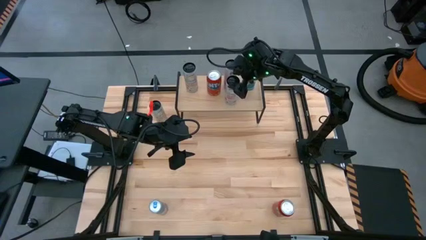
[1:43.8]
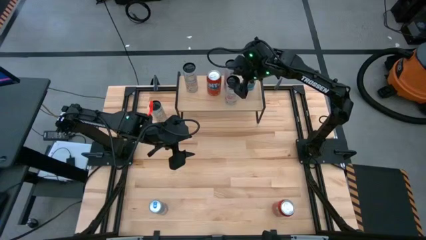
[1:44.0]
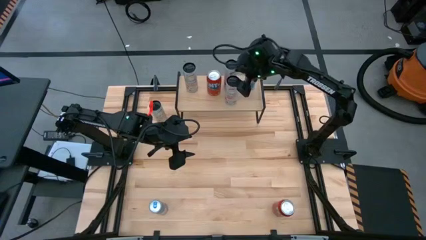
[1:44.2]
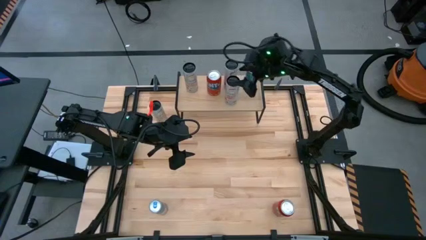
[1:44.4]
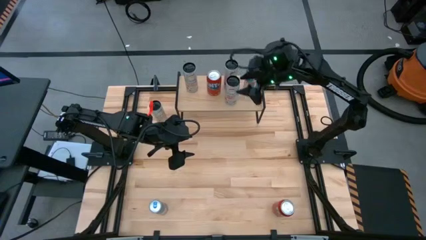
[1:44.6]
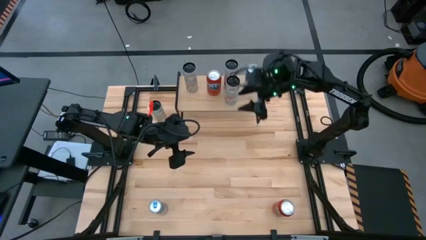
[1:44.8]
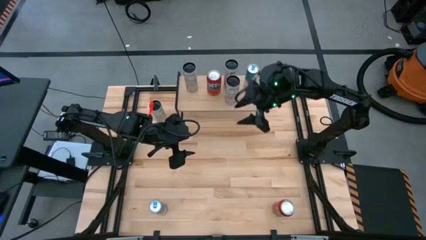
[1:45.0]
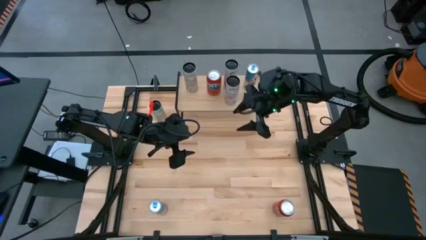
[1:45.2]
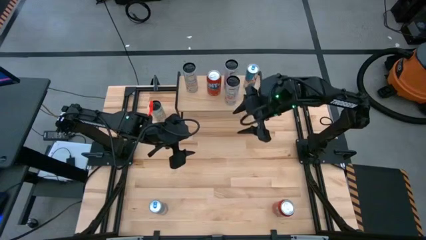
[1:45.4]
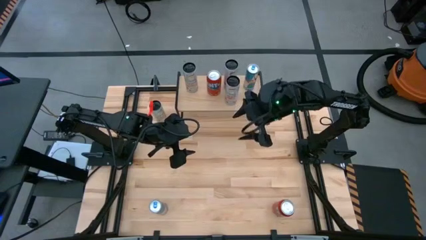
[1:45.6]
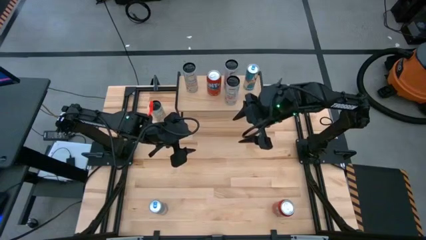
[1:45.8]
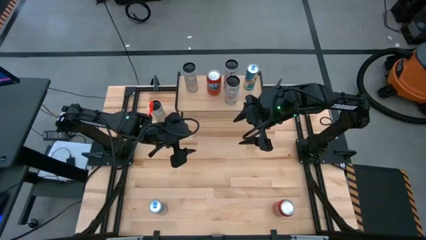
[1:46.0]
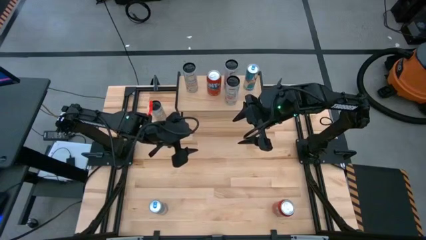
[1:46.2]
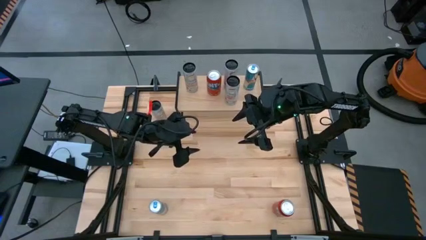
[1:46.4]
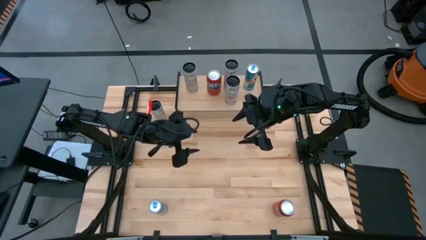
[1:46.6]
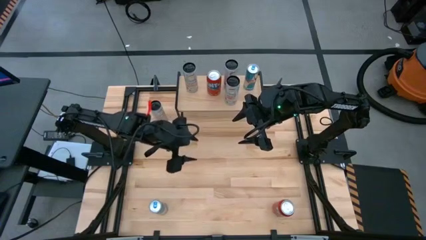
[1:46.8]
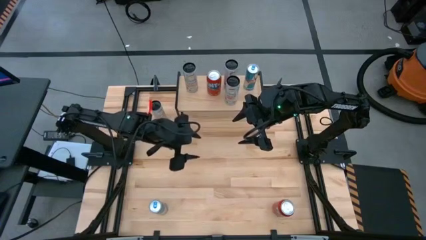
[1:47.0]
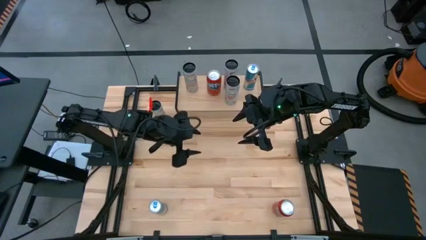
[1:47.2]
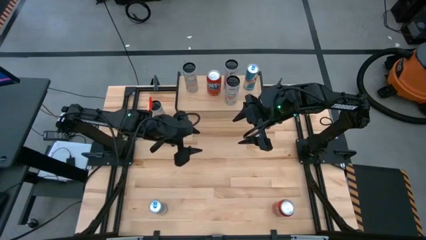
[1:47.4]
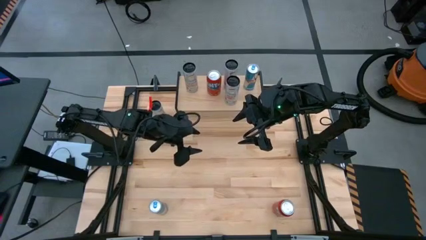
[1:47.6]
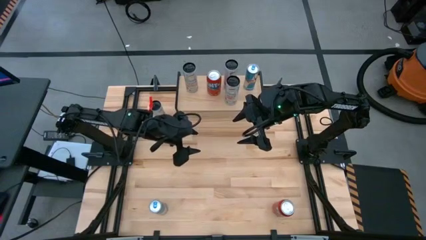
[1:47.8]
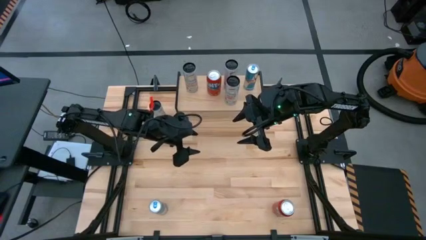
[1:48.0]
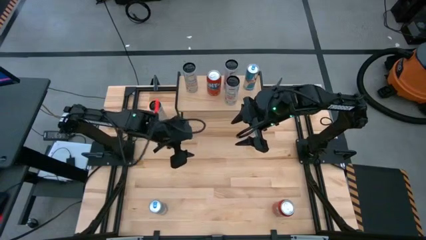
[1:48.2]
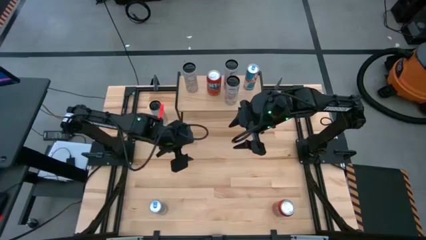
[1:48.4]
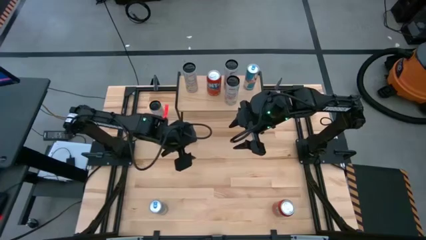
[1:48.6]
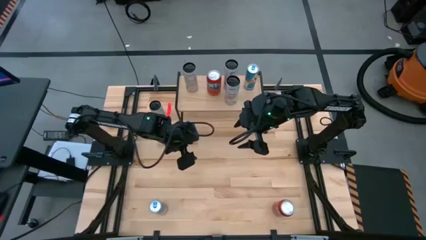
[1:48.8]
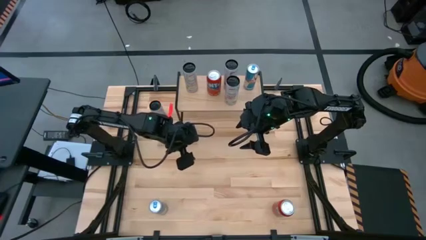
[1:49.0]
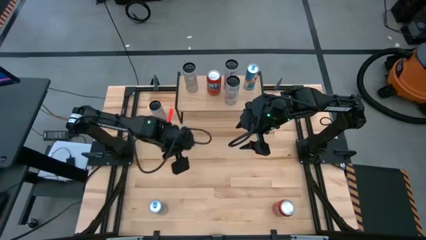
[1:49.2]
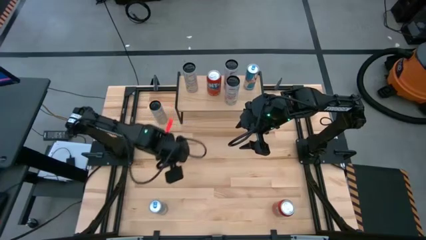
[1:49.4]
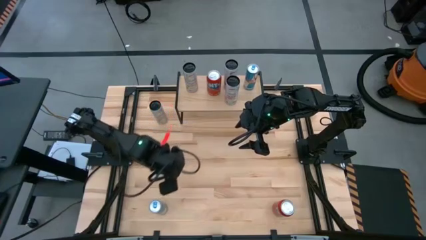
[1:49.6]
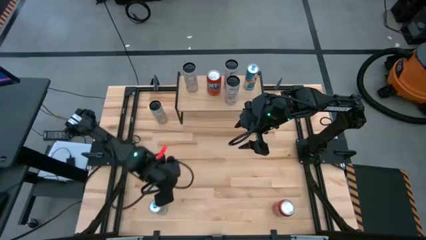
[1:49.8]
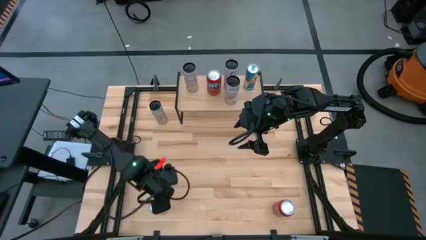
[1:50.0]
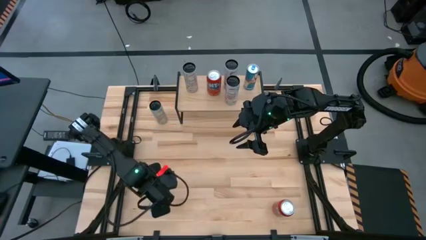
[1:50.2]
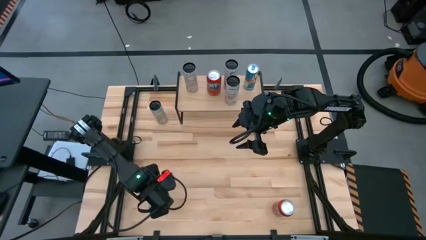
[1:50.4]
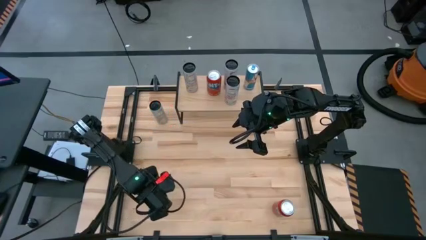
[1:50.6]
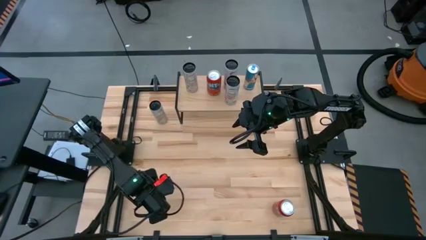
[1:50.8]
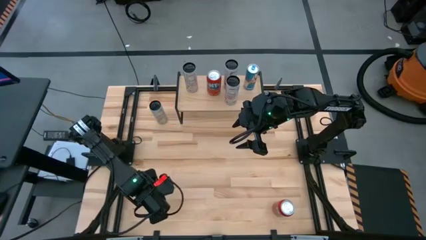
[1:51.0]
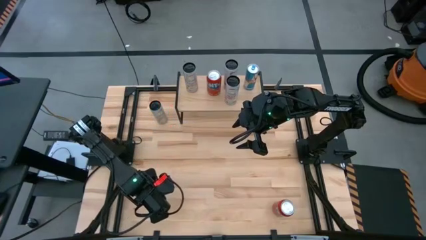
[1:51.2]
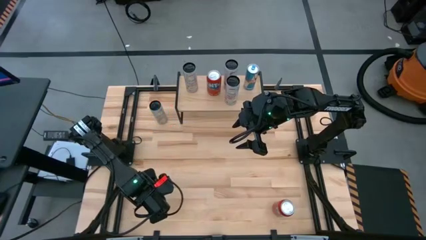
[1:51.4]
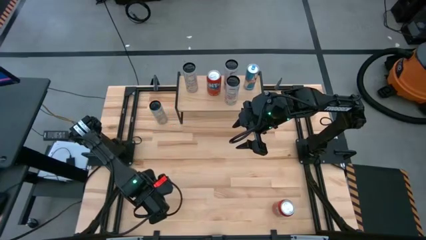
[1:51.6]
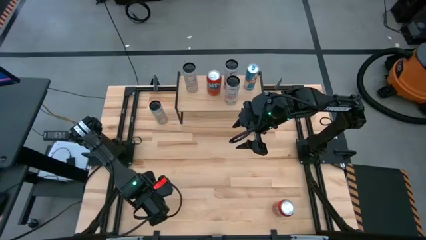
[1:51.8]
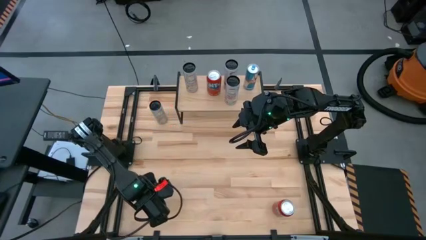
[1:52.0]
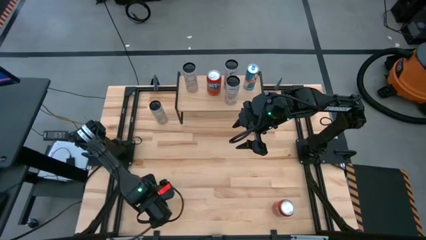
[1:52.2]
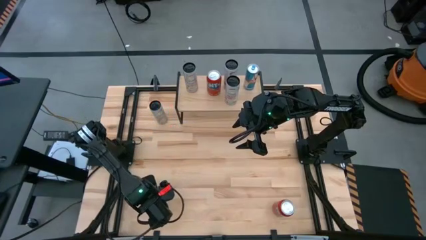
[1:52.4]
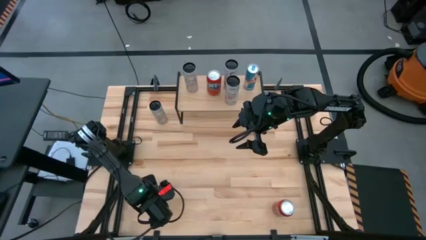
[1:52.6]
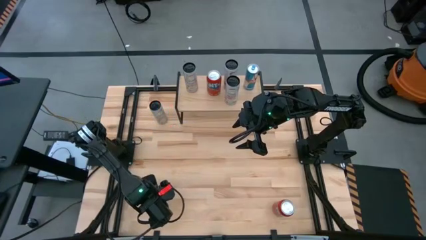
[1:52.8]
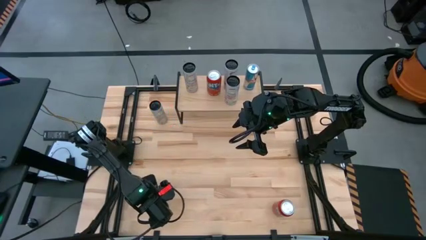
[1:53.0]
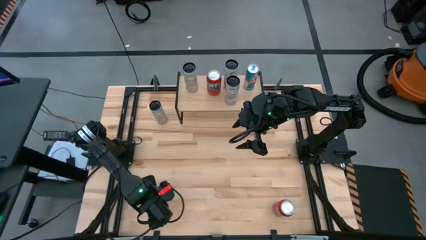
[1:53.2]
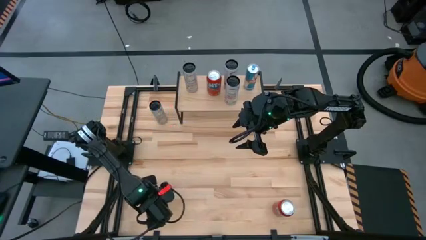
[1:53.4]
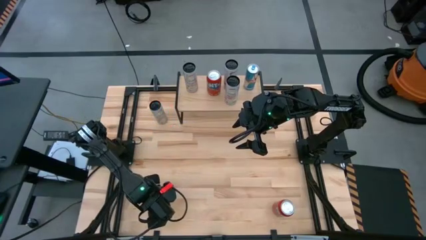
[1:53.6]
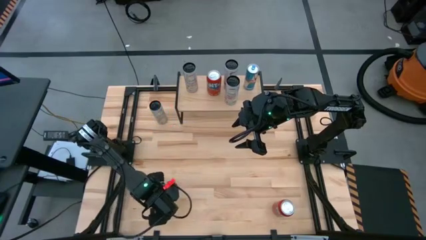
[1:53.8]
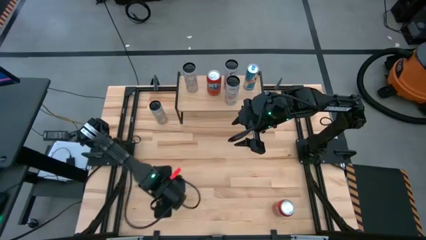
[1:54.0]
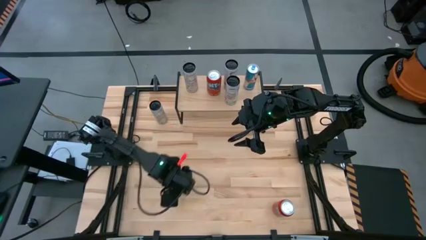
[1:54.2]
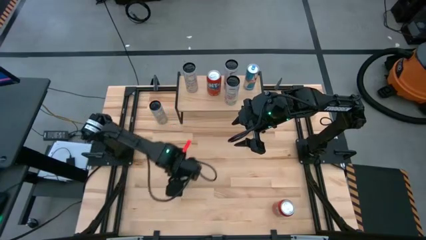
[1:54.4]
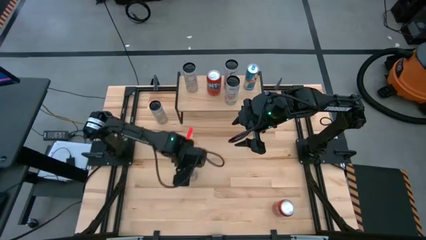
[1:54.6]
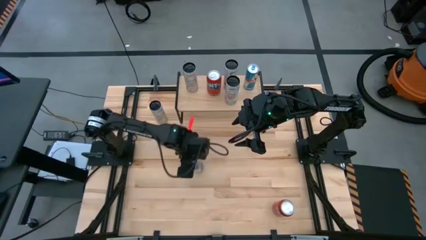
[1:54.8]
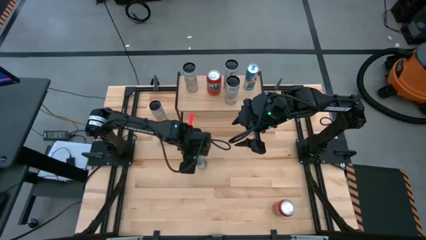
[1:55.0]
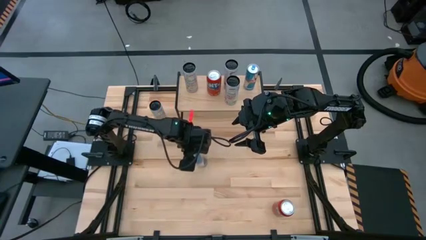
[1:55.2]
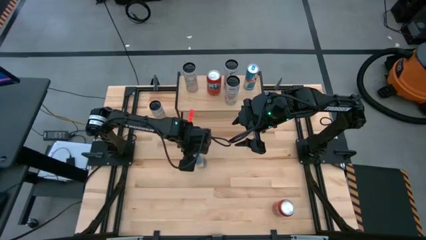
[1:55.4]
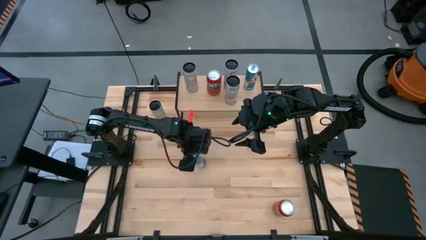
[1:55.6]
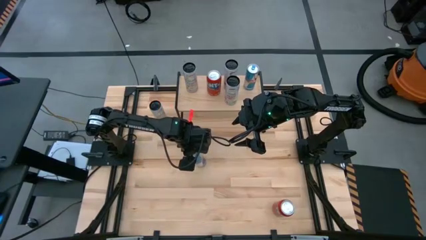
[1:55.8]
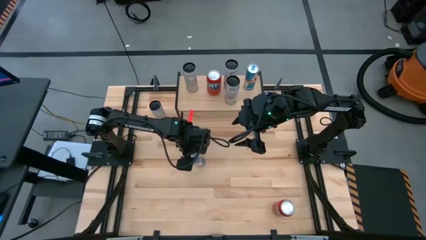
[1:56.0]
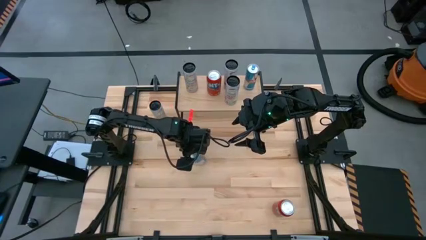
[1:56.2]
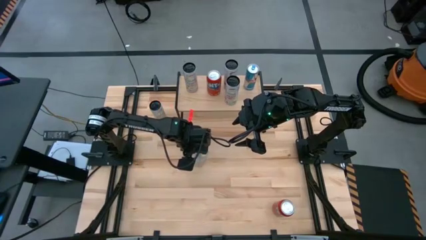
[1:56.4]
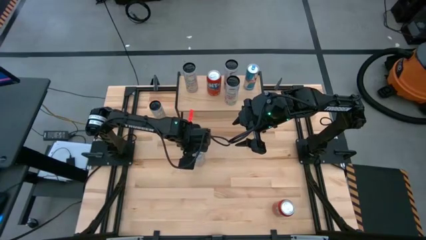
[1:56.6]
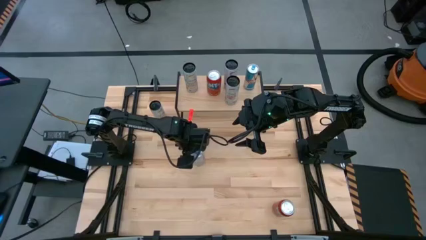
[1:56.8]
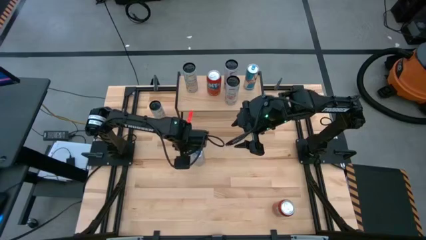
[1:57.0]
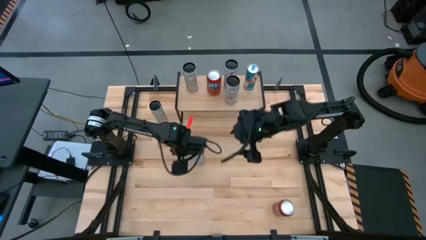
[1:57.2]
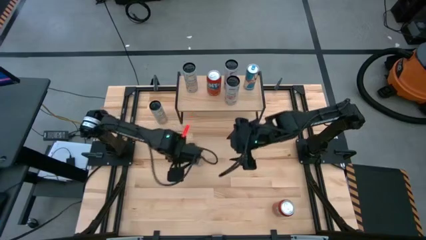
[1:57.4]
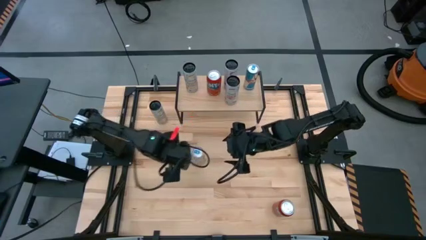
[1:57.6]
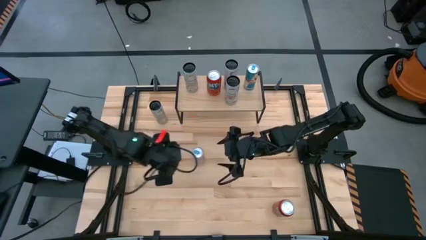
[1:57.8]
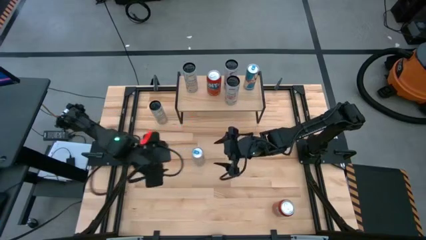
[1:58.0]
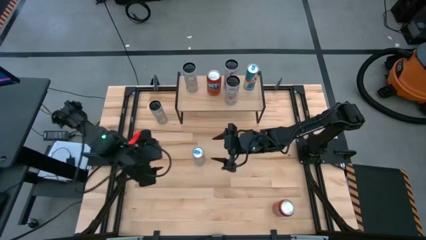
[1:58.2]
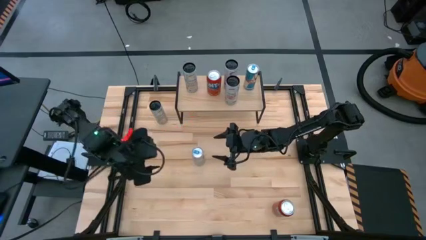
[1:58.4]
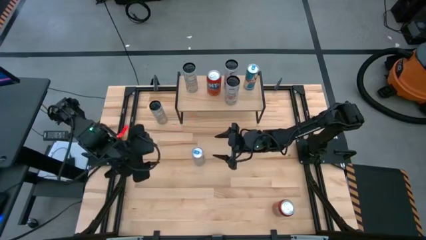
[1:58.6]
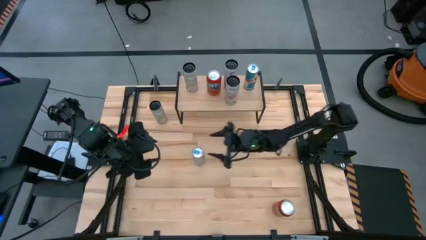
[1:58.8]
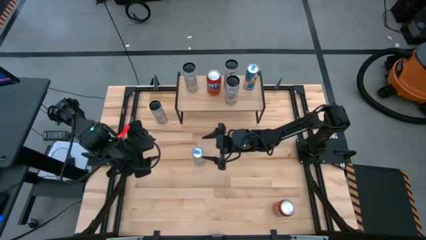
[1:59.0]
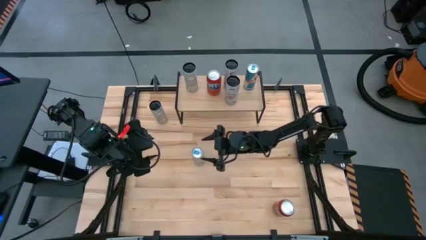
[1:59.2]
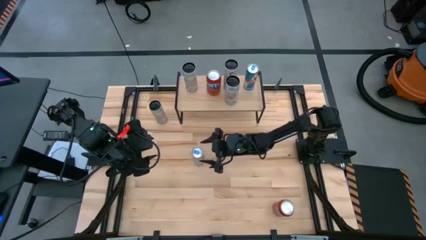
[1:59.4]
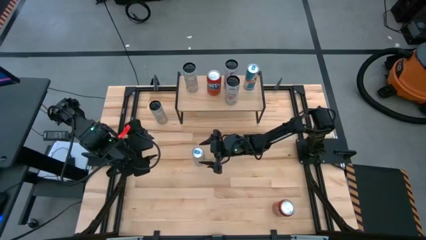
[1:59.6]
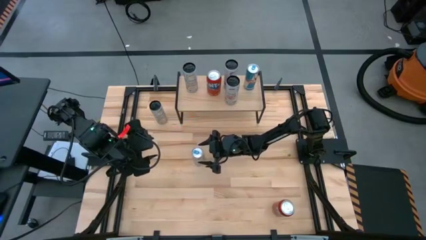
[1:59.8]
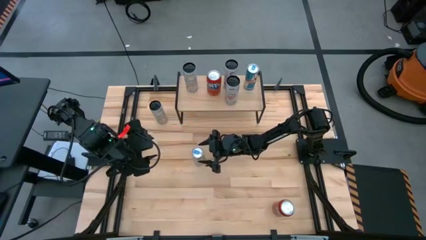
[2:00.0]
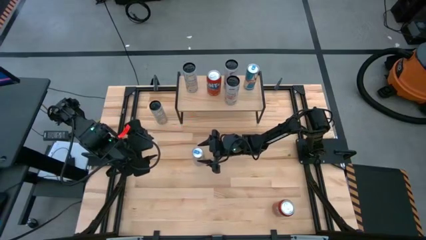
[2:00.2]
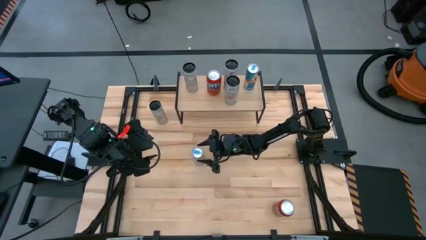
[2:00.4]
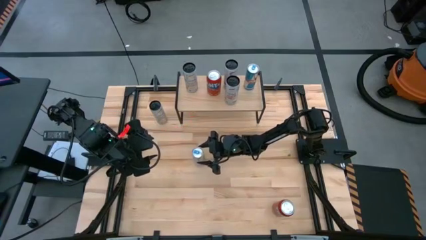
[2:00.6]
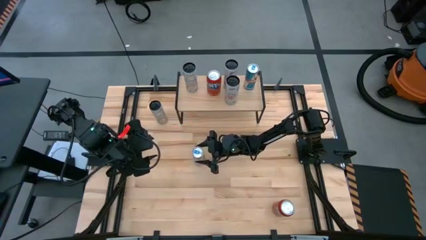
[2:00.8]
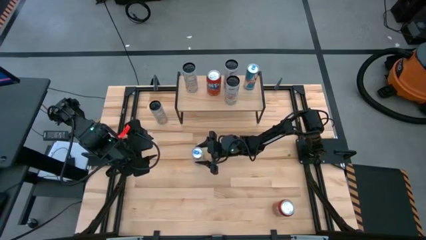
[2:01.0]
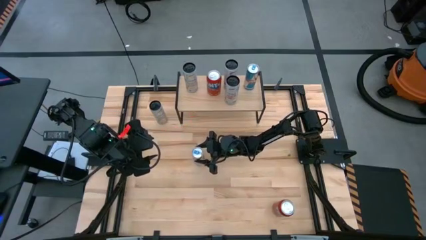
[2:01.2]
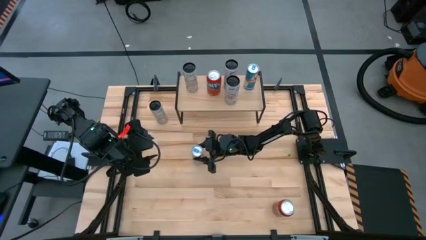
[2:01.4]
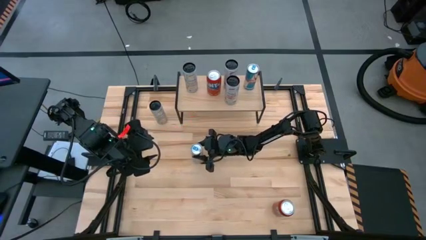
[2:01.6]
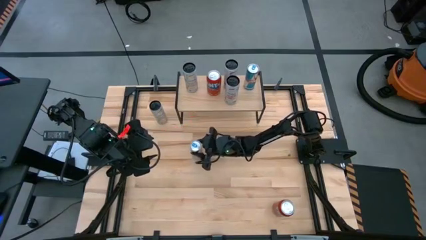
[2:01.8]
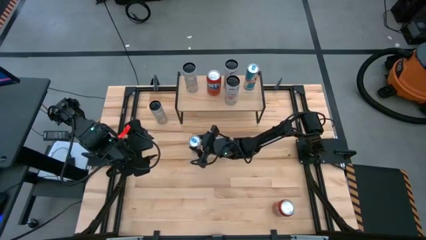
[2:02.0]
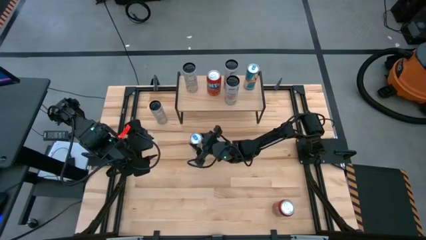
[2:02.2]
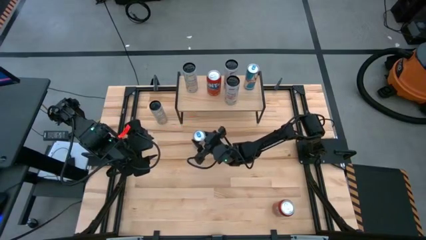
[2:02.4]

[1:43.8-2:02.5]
Task: Place canned beverage on shelf
Put the blue soda can on the shelf aligned with the other blue soda can
